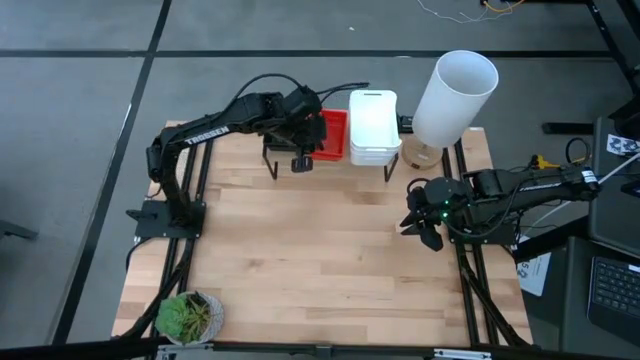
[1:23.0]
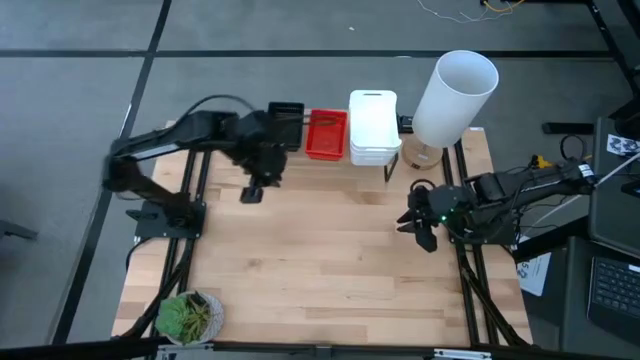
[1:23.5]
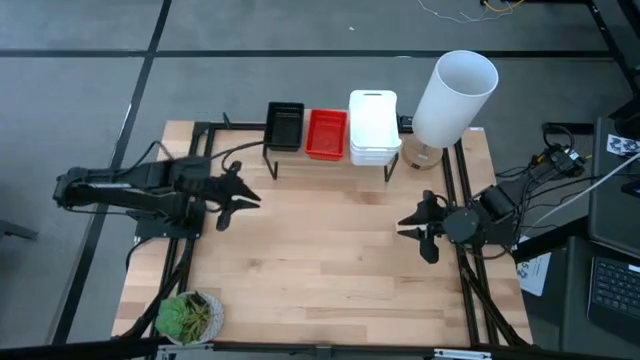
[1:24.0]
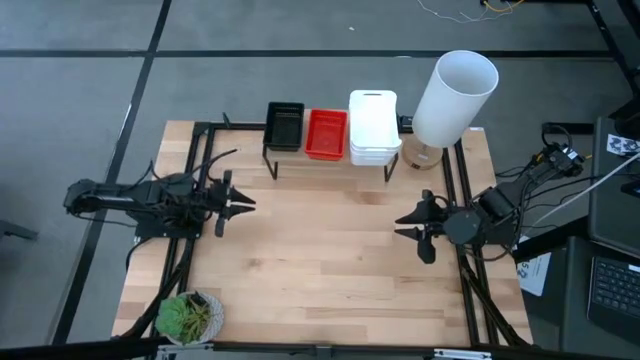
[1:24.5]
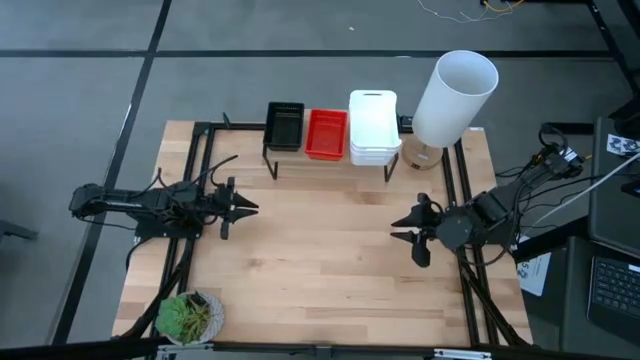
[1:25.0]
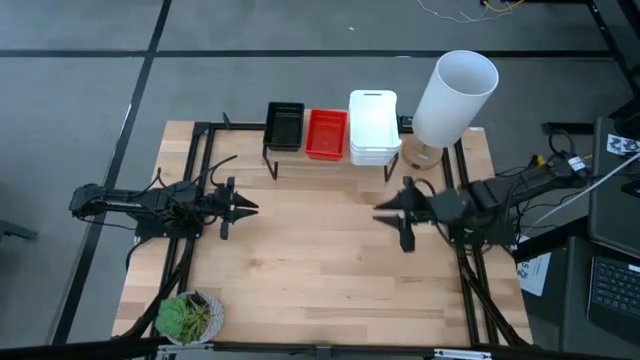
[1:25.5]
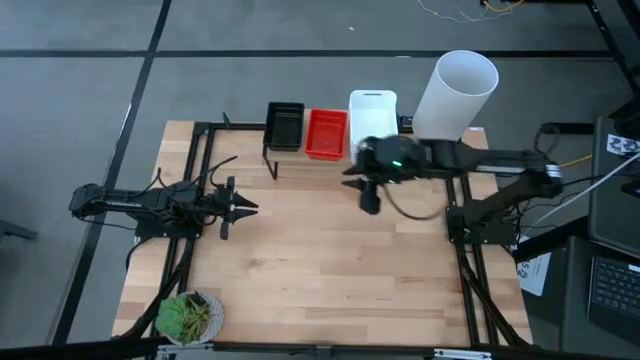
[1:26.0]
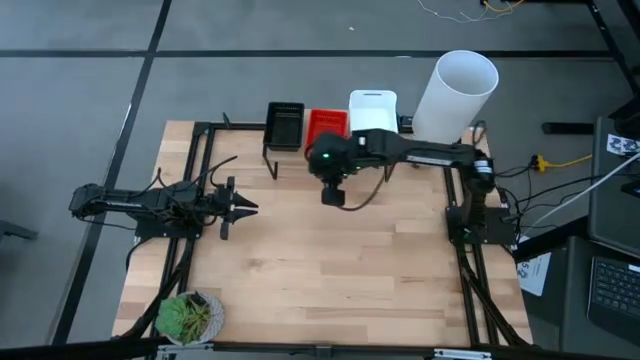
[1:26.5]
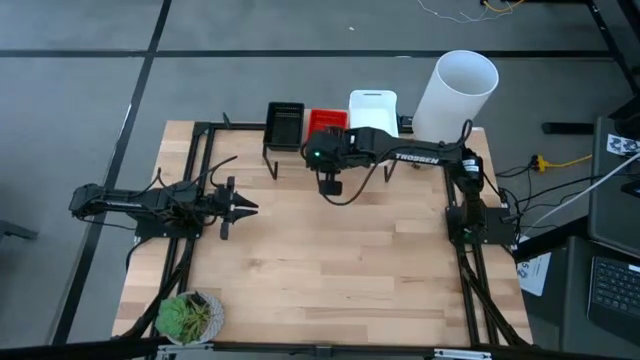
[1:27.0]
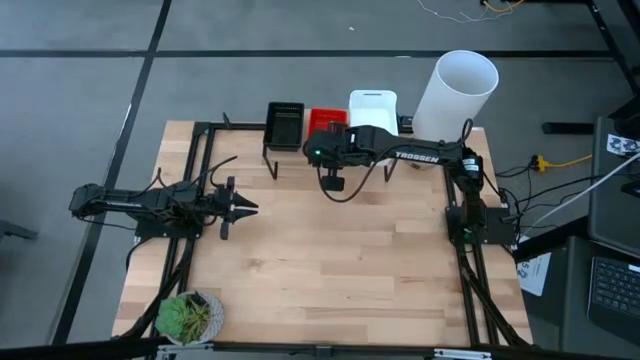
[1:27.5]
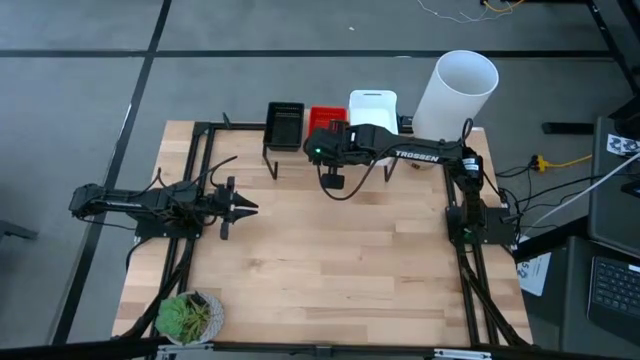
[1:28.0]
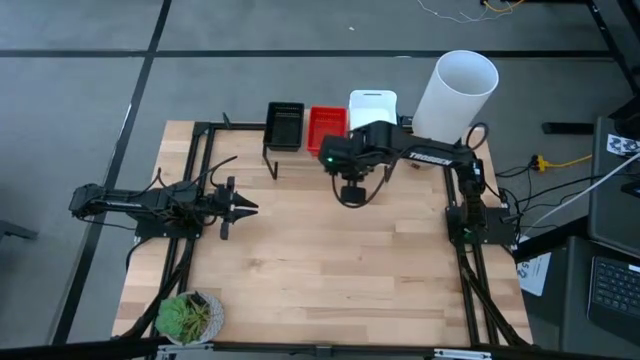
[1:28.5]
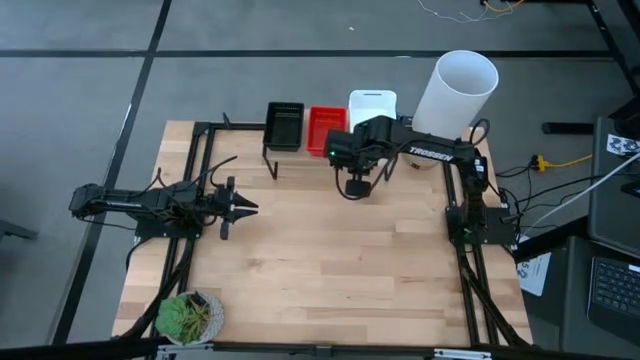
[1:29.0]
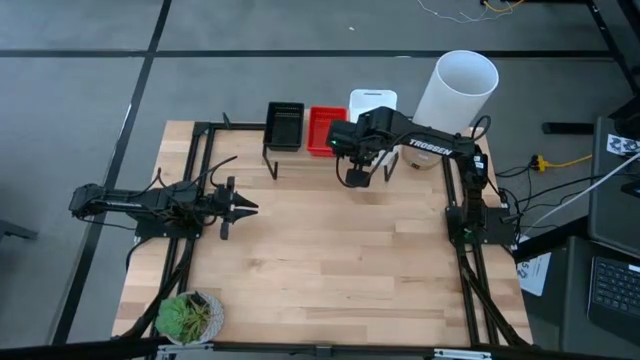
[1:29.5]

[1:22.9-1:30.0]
Task: Stack baskets on shelf by color
Adjust the stacked bins on the shelf

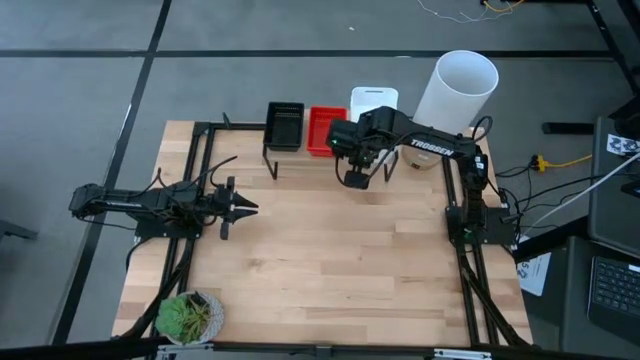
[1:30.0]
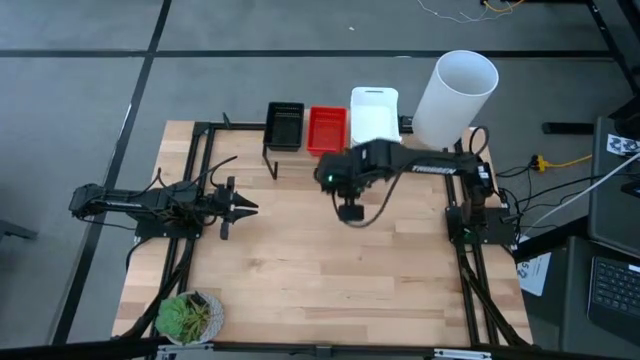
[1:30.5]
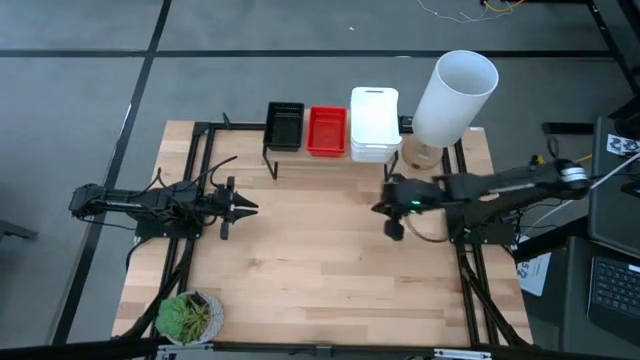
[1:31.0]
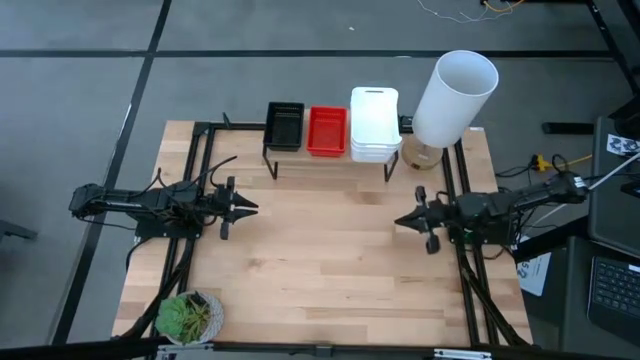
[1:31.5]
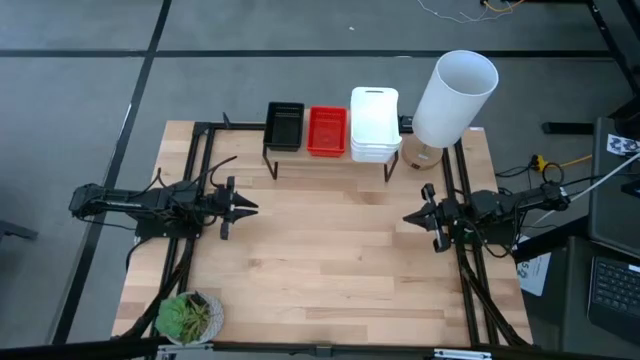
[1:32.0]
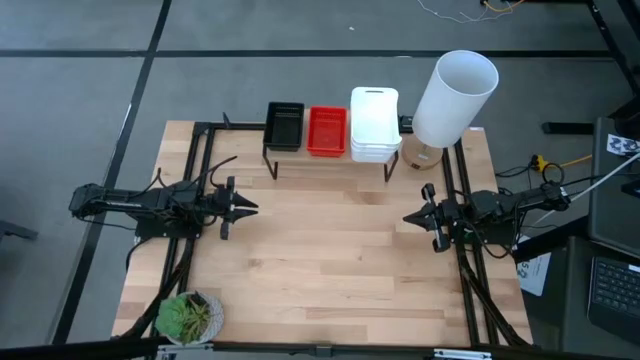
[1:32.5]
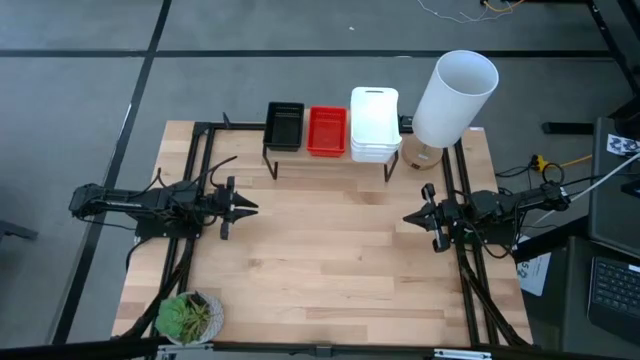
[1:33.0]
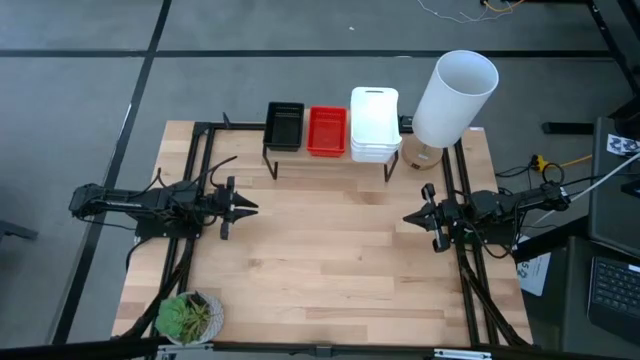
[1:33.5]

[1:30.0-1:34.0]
Return to Home Position

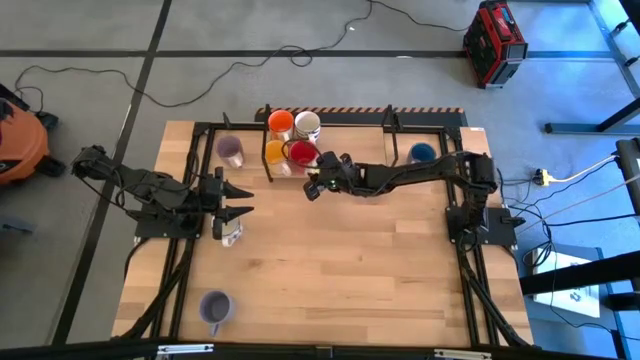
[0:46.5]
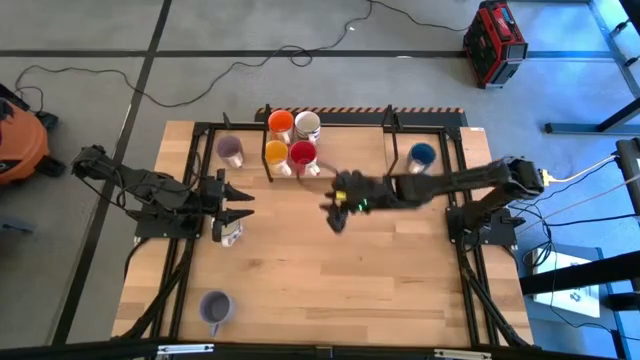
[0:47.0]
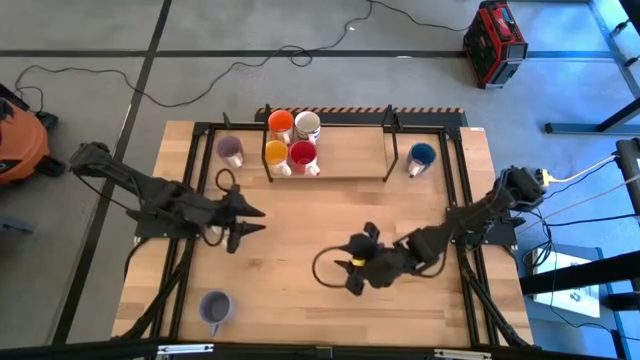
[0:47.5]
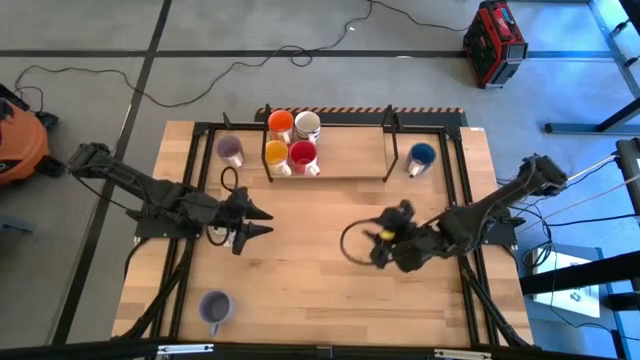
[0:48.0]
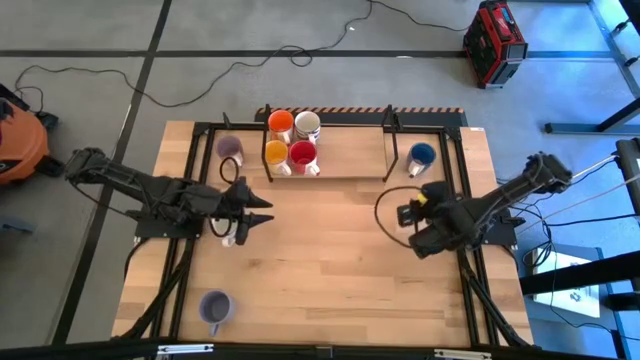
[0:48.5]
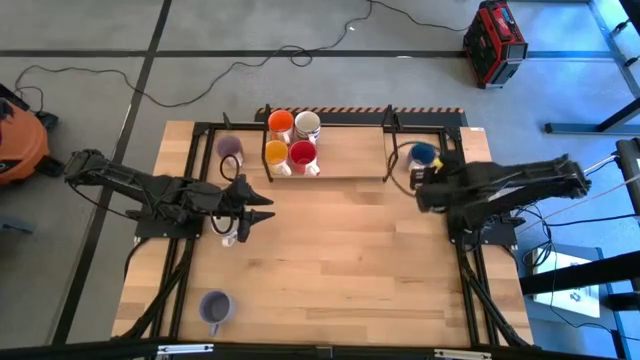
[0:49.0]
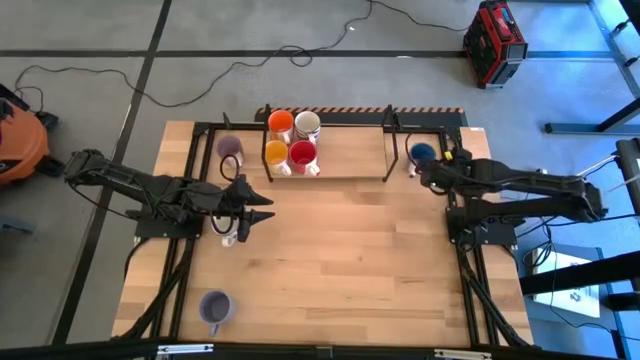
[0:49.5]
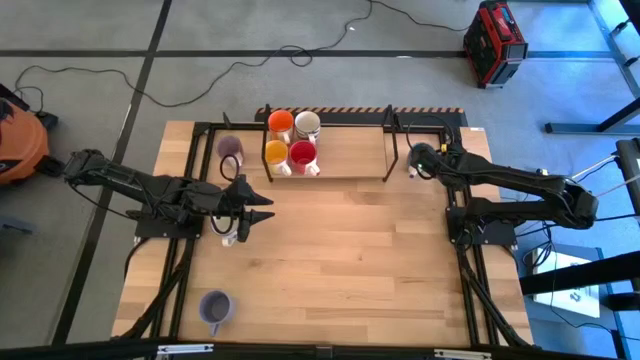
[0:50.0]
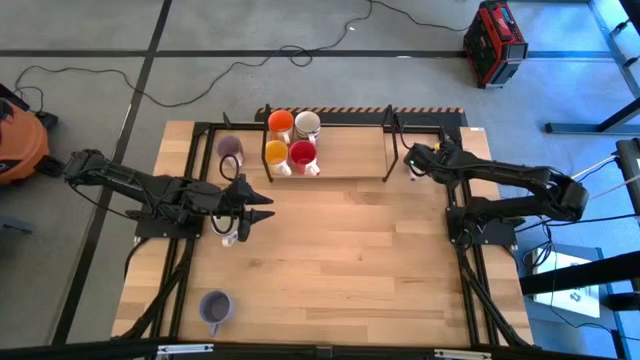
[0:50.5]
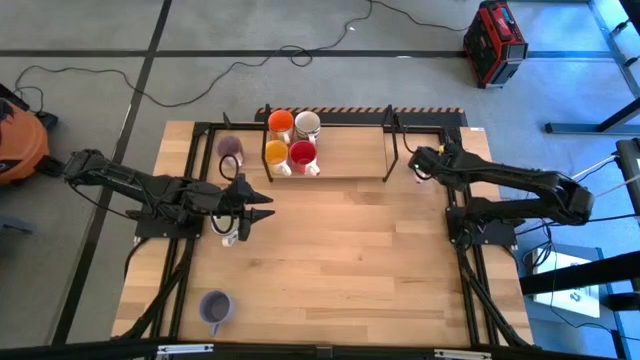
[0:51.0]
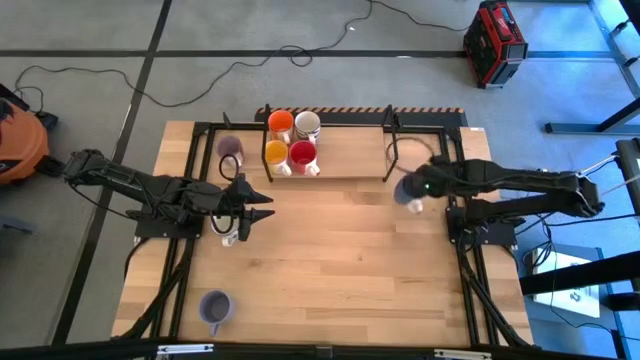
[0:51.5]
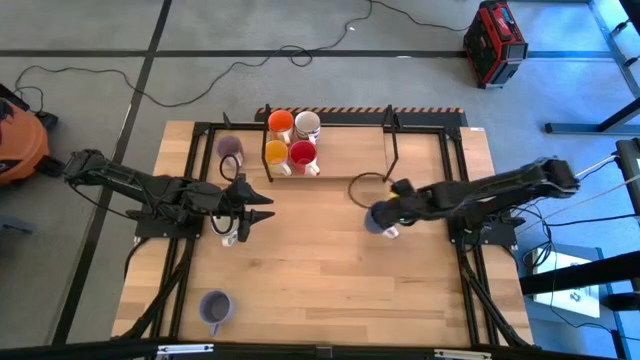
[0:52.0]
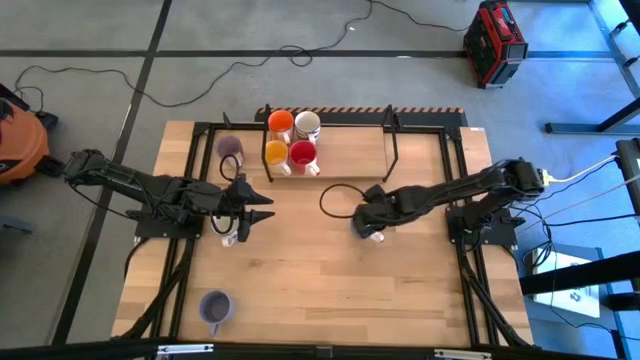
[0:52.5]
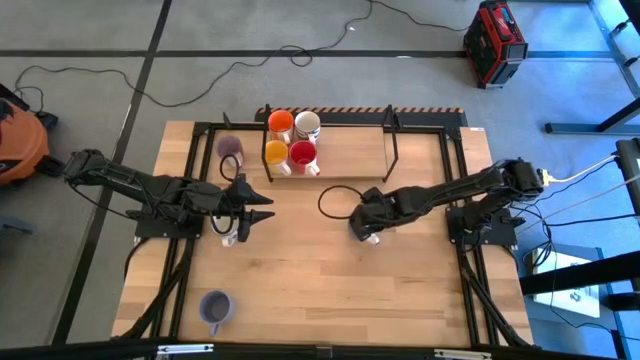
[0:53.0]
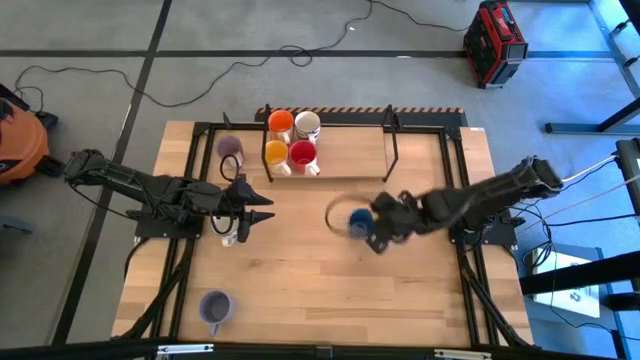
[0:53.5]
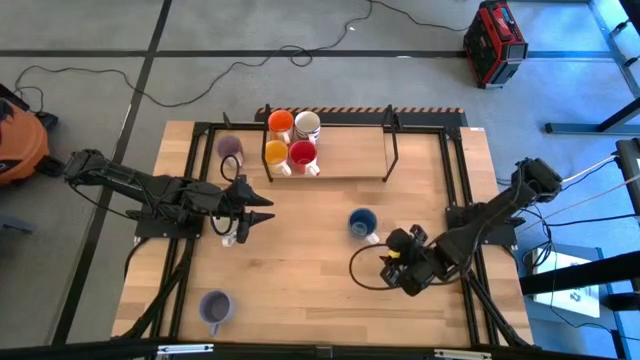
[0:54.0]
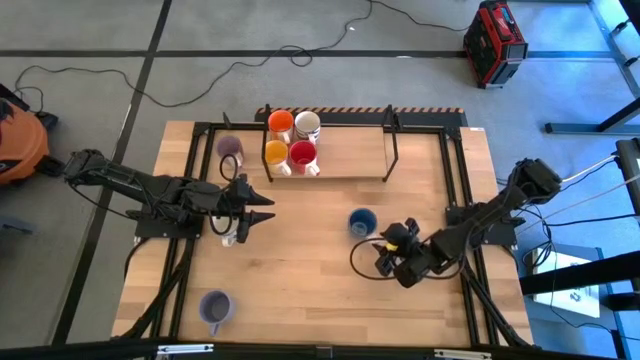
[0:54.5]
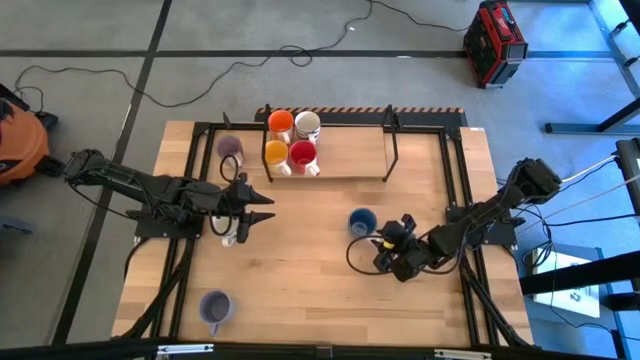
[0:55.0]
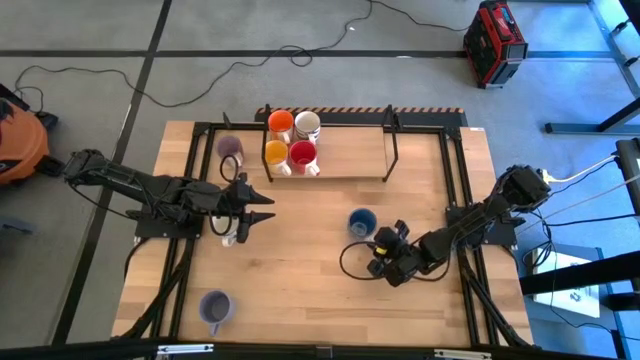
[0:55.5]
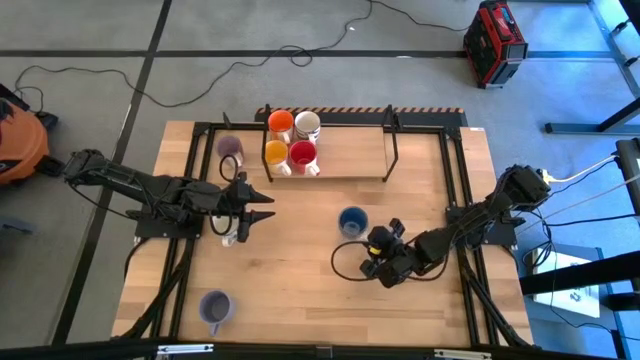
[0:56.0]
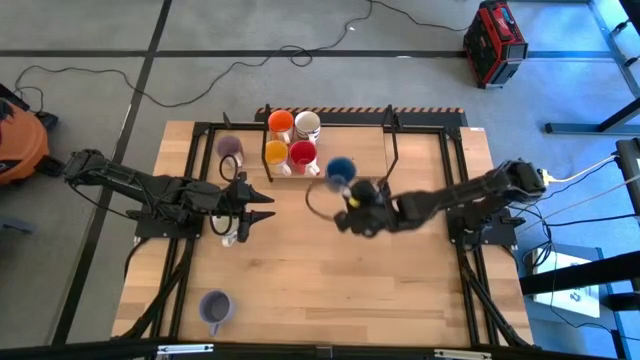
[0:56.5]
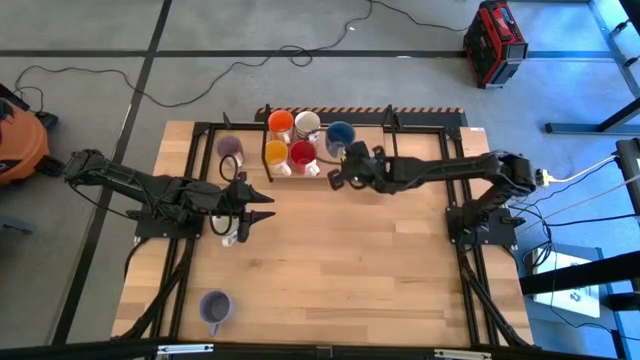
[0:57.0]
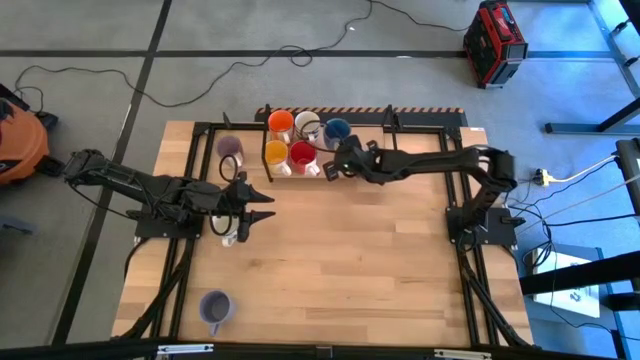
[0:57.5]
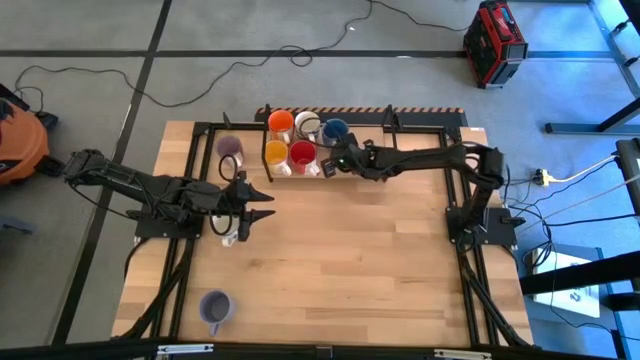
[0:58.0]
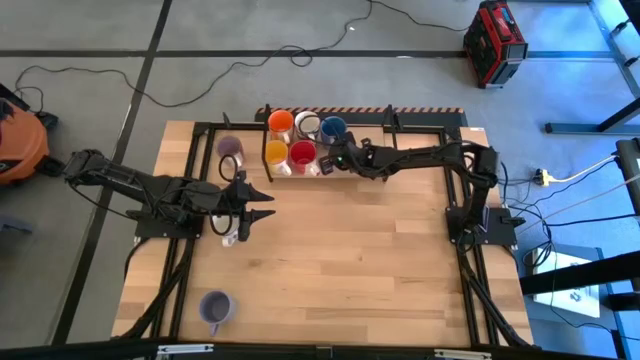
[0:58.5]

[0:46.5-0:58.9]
Task: Place coffee mugs
Put the blue mug on the shelf
